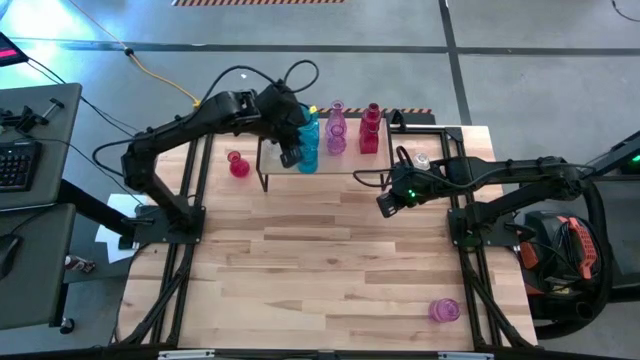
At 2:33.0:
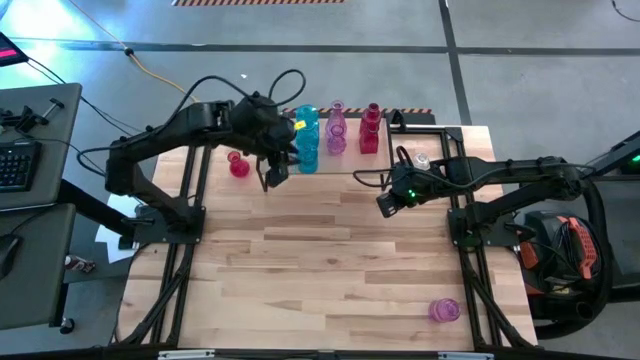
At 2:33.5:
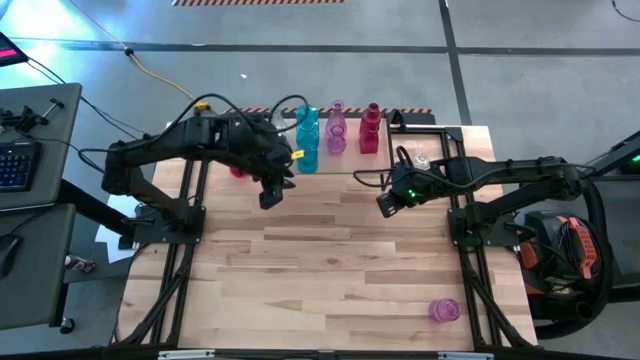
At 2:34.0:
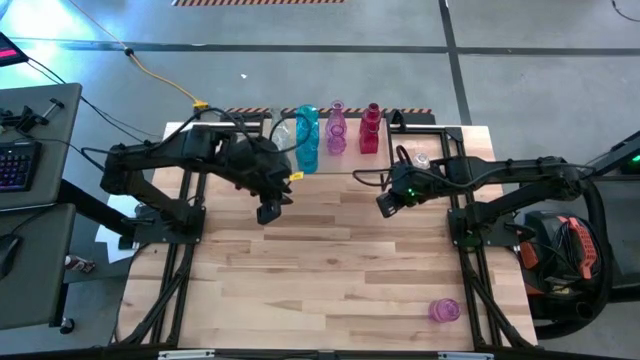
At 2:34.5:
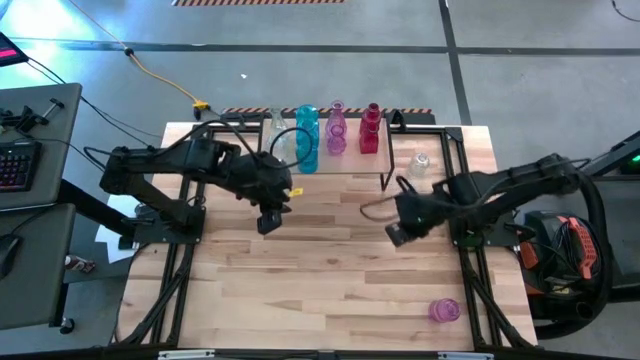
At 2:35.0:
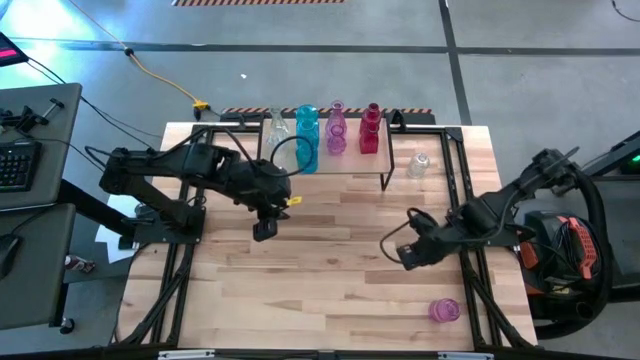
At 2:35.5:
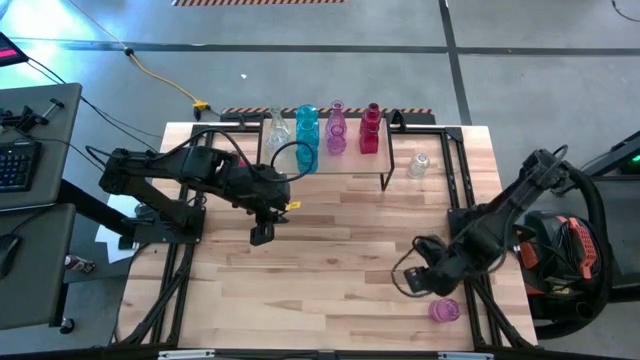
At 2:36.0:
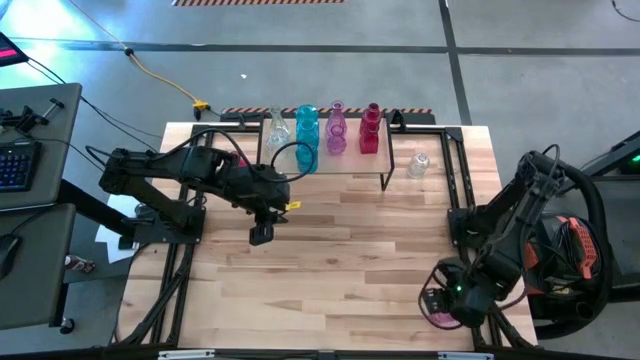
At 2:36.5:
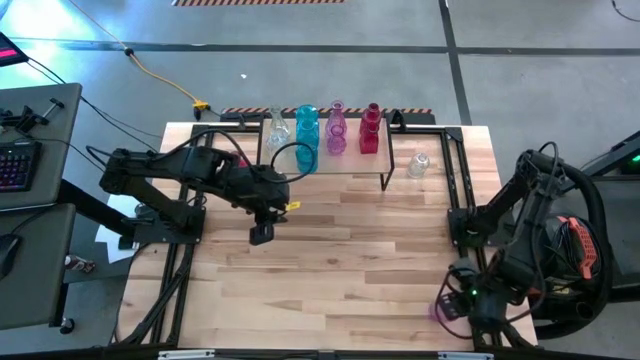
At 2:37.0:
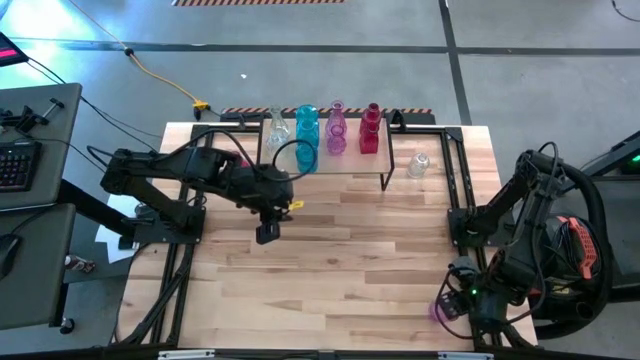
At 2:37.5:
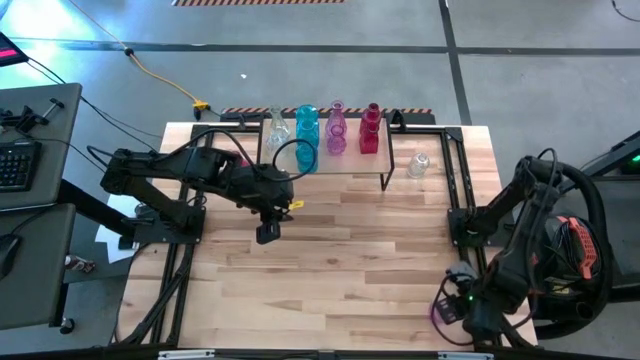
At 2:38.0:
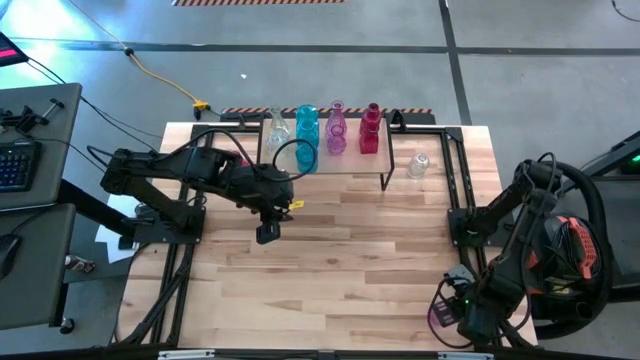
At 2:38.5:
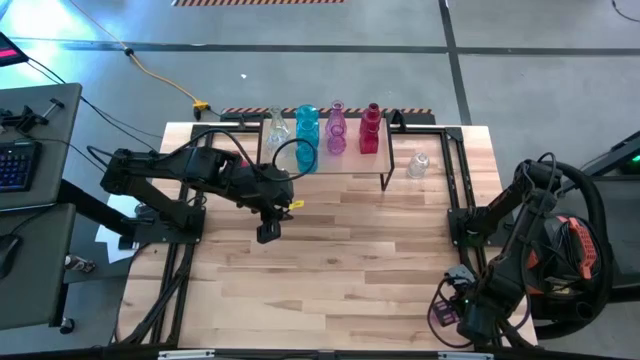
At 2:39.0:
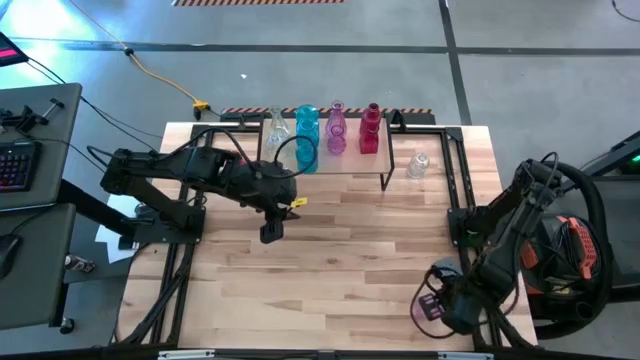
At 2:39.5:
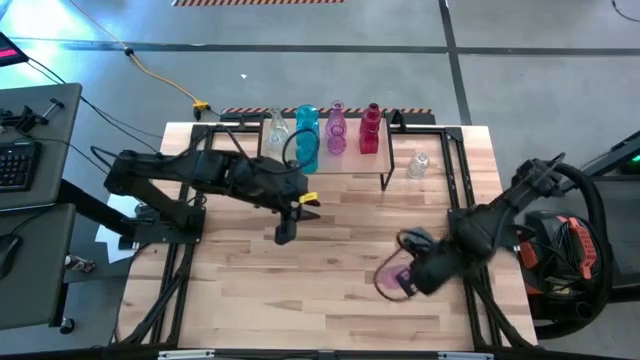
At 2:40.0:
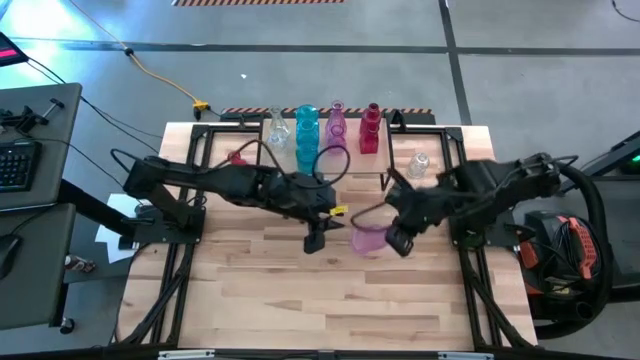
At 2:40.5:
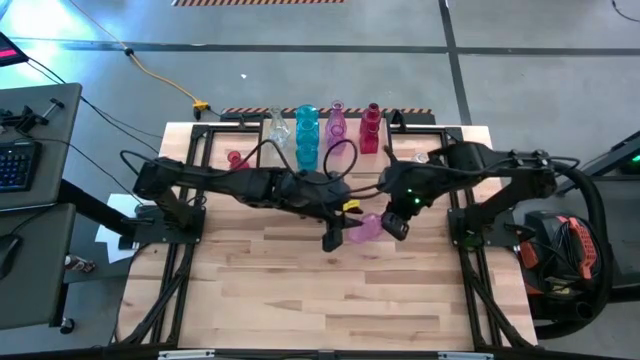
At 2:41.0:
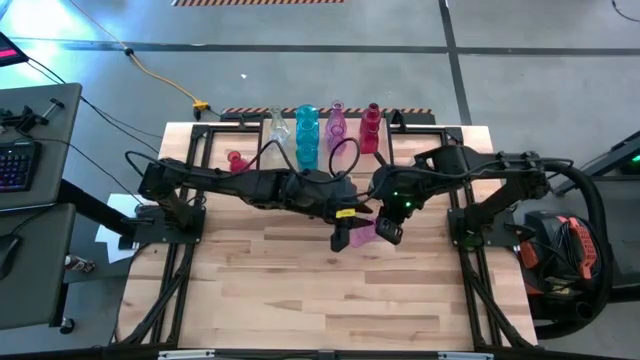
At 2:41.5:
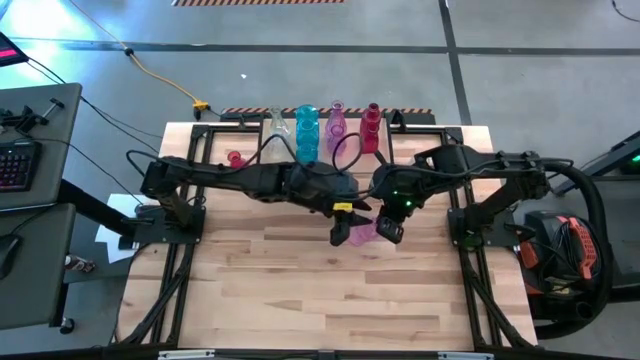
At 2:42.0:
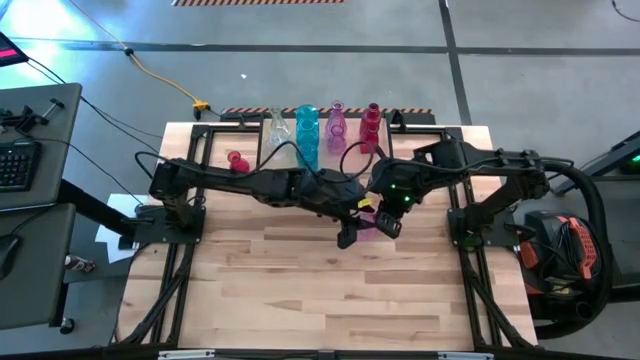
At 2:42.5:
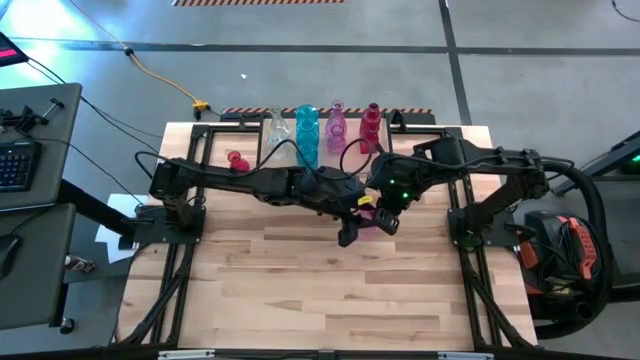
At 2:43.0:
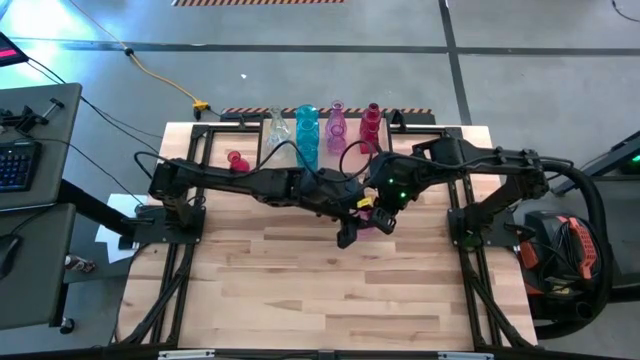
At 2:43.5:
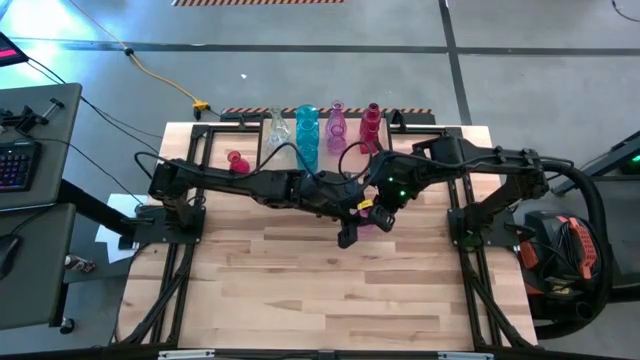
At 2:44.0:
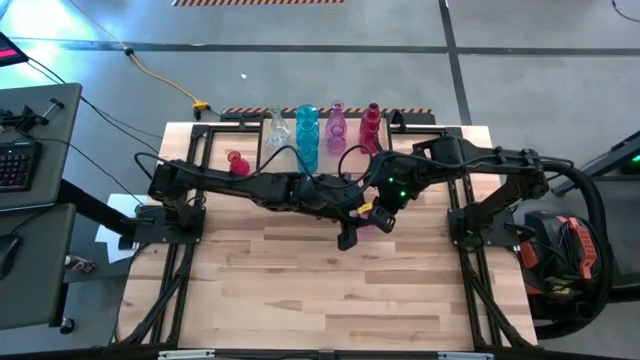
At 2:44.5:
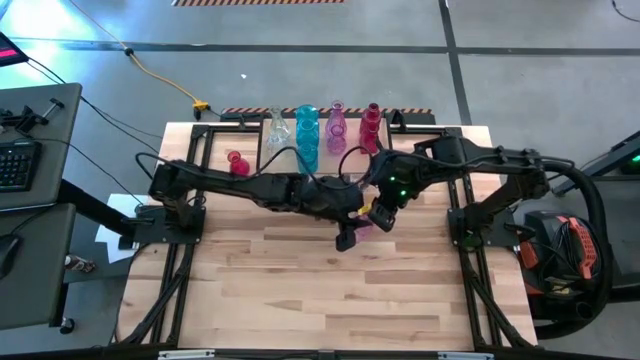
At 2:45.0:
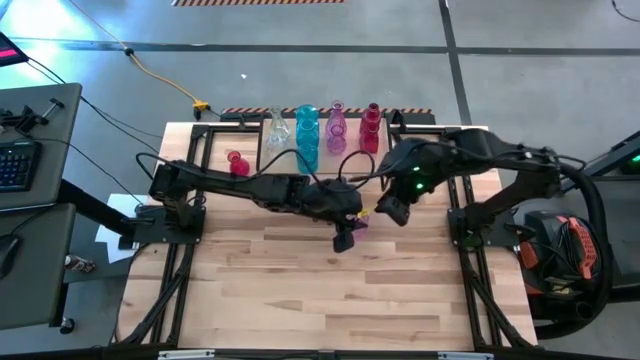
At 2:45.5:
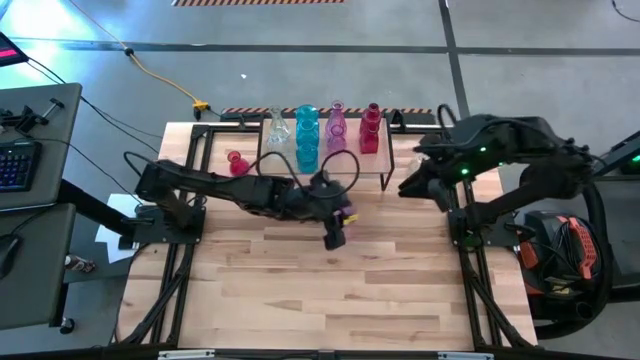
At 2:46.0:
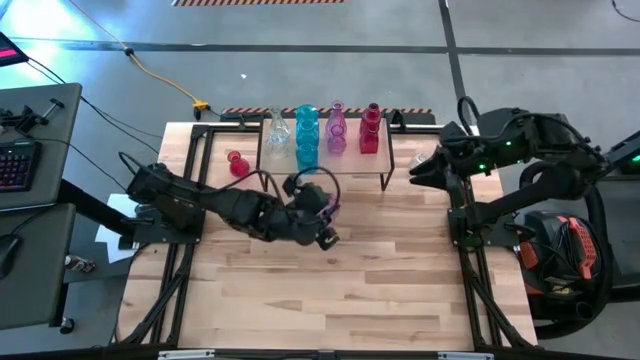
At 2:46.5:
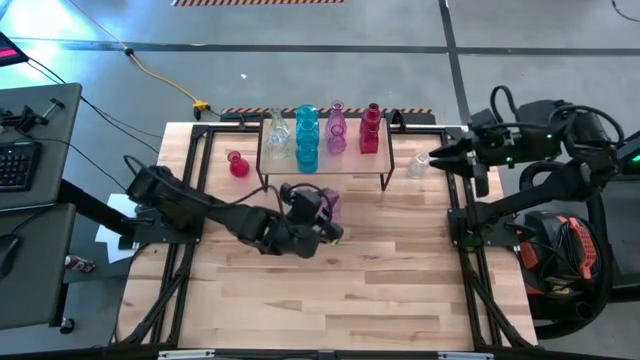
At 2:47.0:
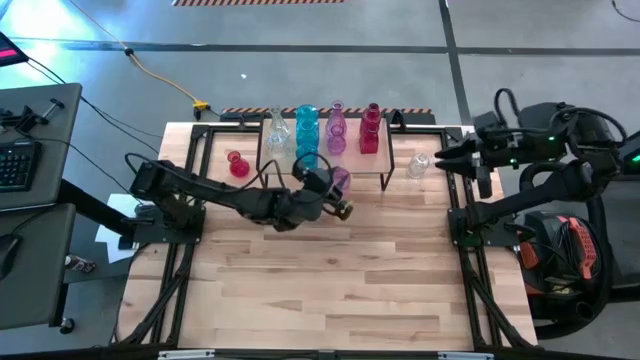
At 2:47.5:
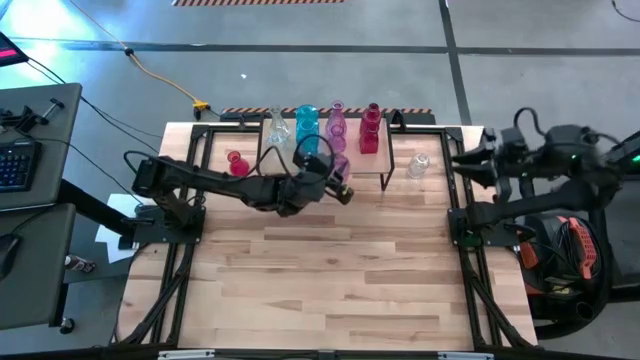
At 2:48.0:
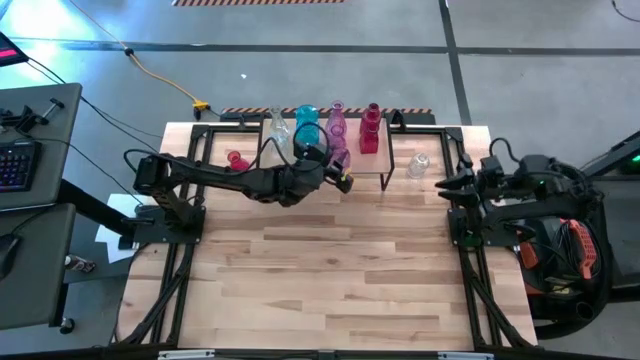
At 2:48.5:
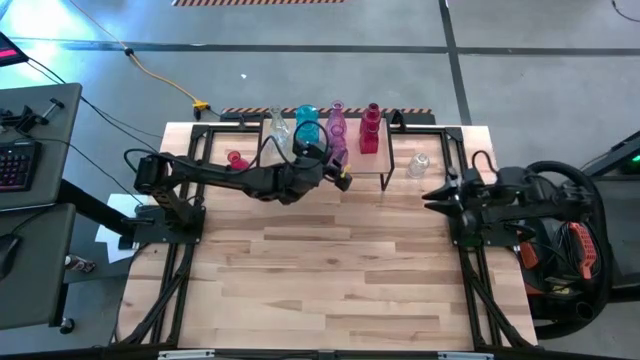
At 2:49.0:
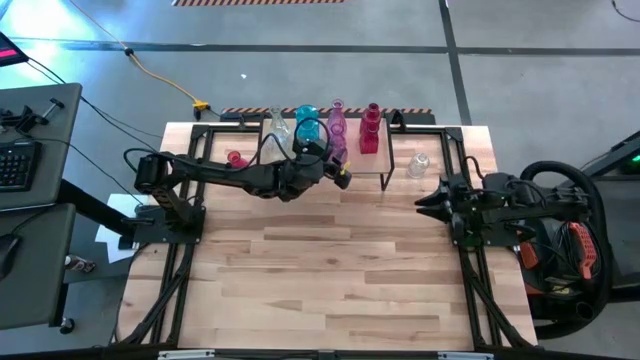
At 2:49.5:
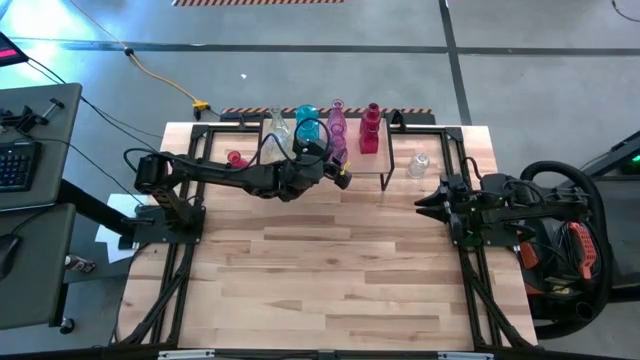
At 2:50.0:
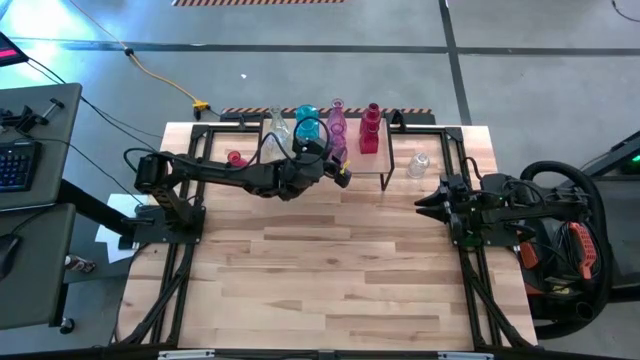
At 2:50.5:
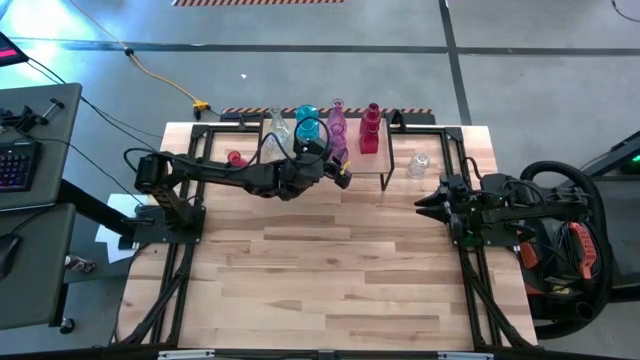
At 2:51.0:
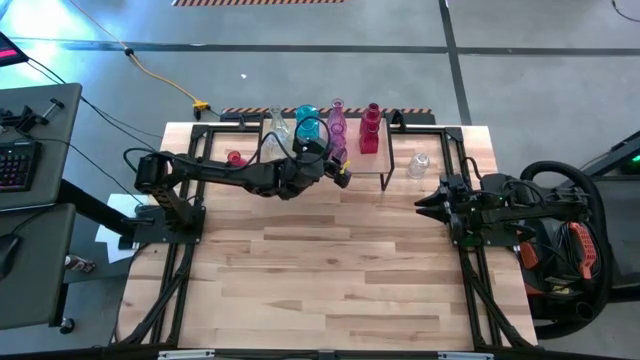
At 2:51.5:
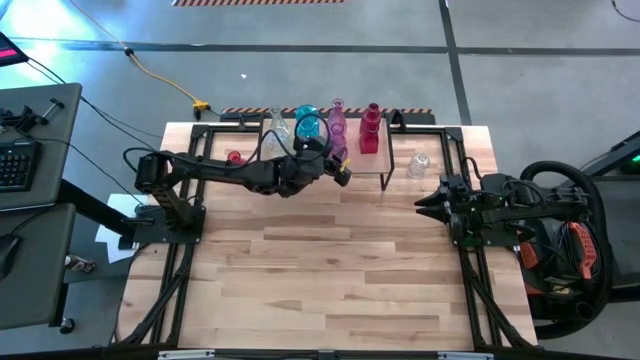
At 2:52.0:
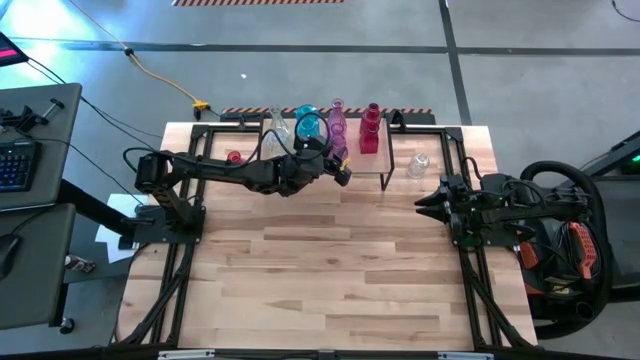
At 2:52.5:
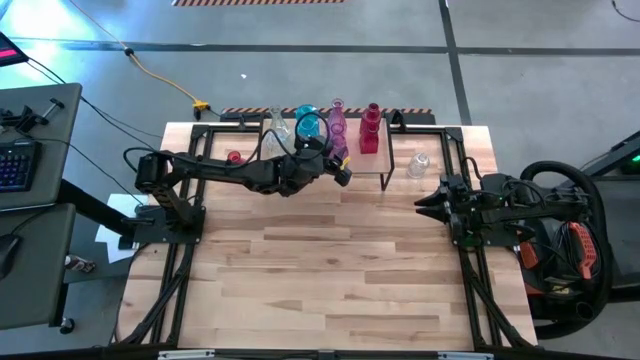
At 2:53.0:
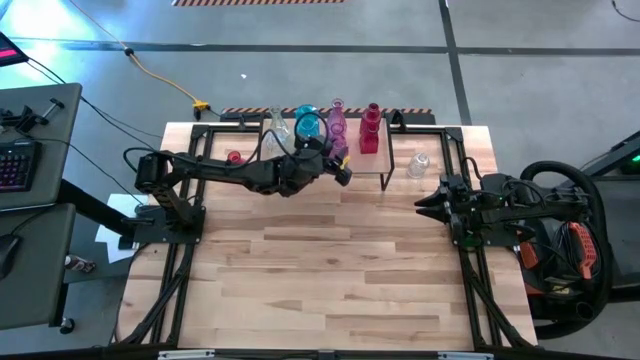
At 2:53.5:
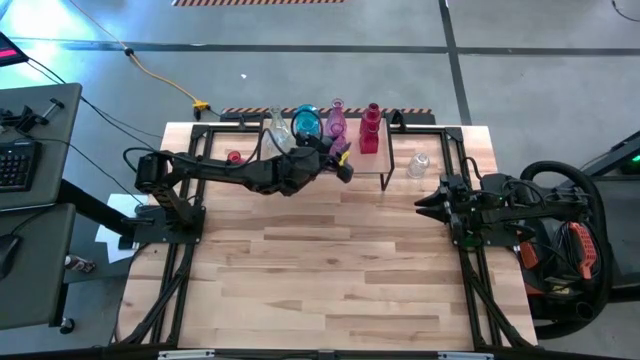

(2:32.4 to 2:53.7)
Task: sort vases onto shelf
Put the purple flower vase on the shelf aligned with the other purple flower vases
